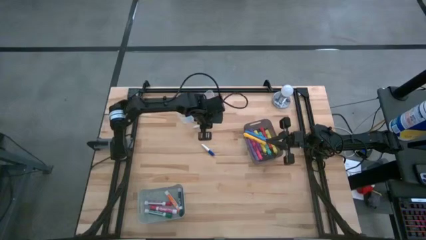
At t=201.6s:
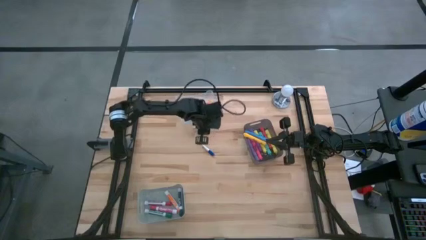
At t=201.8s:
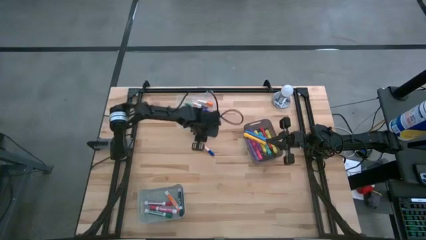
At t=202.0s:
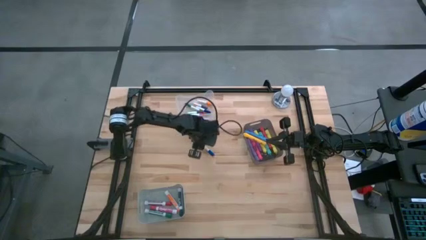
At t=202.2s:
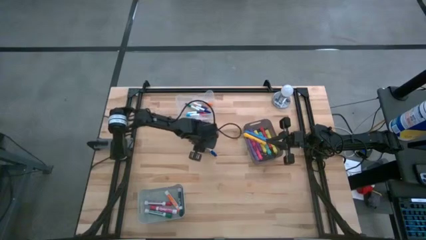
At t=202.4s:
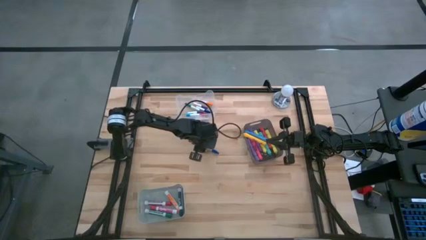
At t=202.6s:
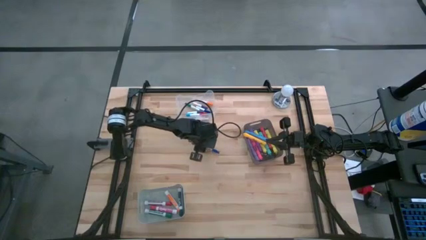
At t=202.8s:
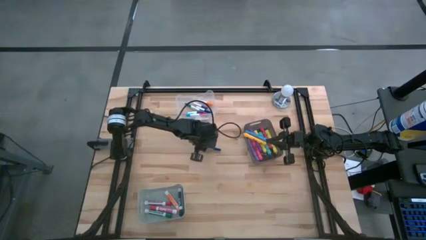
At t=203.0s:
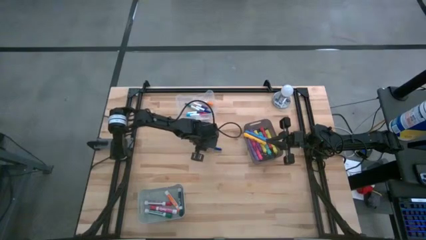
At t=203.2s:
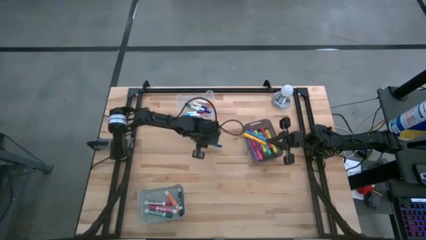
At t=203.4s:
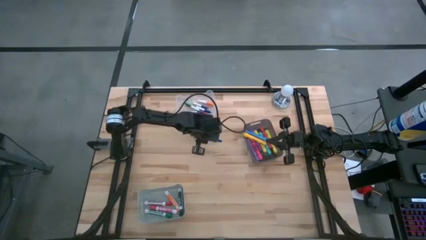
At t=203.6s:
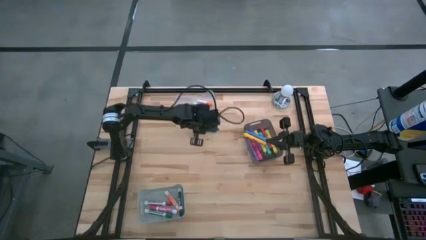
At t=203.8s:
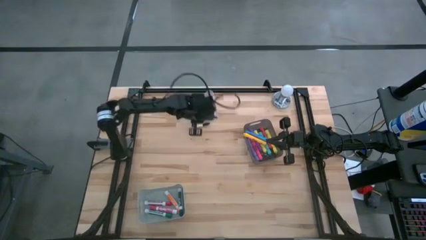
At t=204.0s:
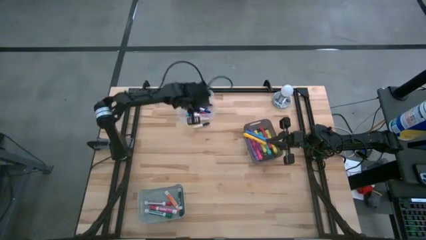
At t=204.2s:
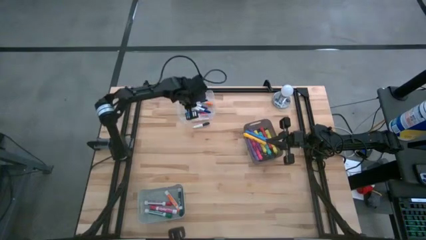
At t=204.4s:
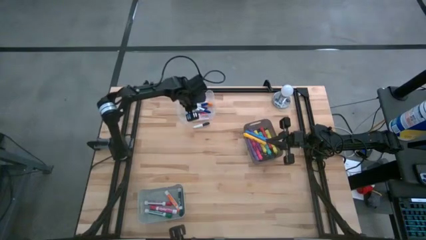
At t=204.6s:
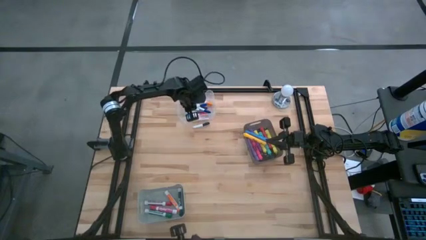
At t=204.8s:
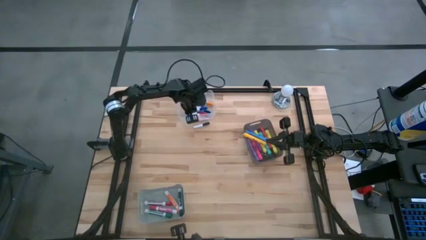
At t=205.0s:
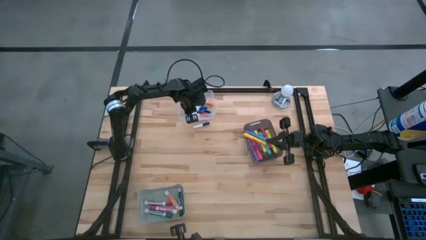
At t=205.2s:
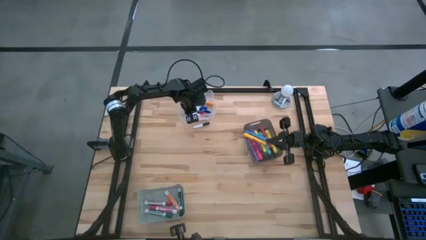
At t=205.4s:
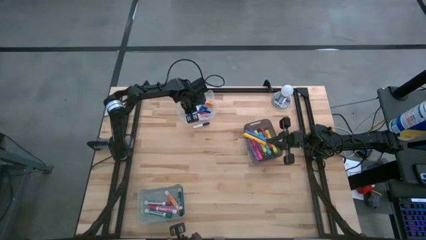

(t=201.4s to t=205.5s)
Task: Pick & Place Markers
Put the white and blue highlighter pen into the transparent bin

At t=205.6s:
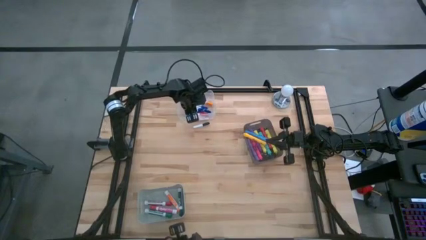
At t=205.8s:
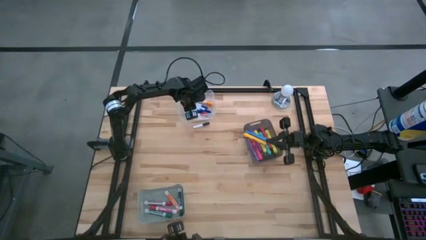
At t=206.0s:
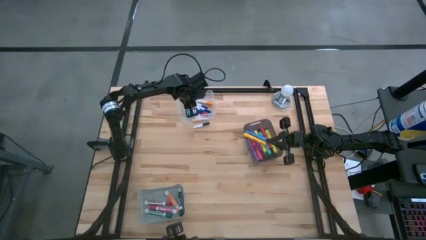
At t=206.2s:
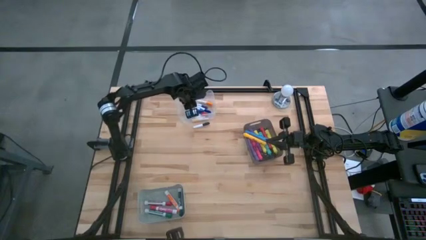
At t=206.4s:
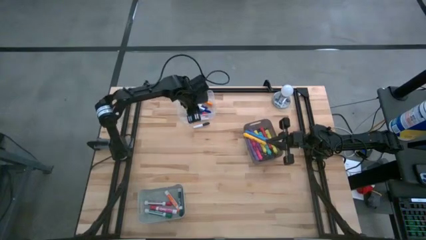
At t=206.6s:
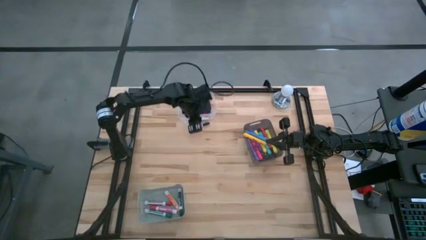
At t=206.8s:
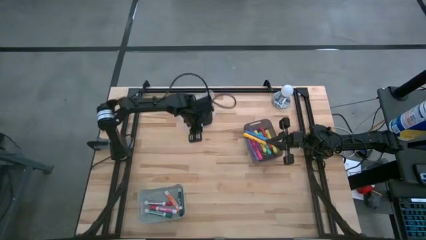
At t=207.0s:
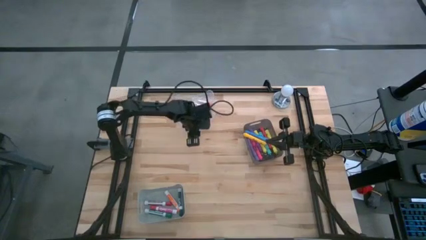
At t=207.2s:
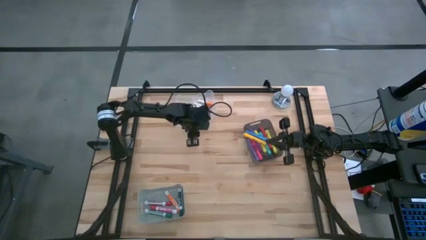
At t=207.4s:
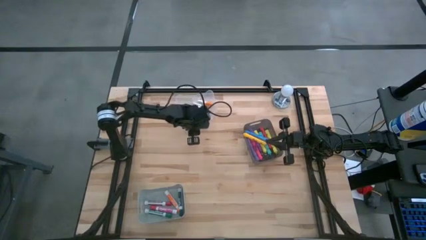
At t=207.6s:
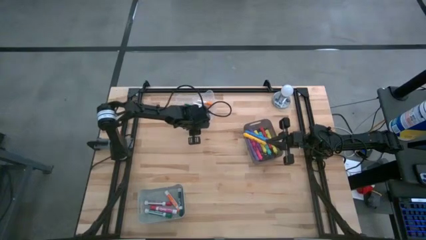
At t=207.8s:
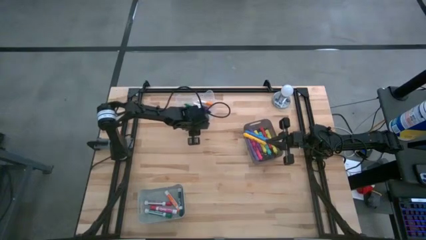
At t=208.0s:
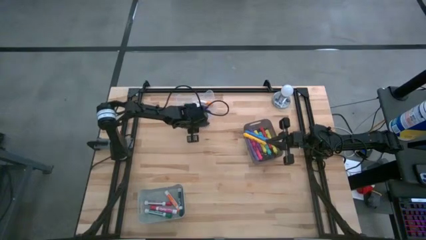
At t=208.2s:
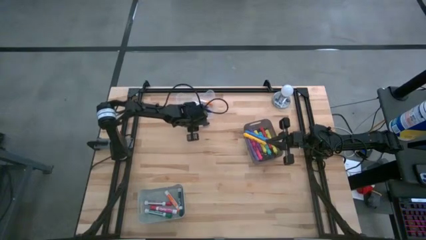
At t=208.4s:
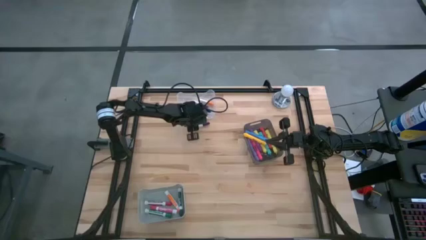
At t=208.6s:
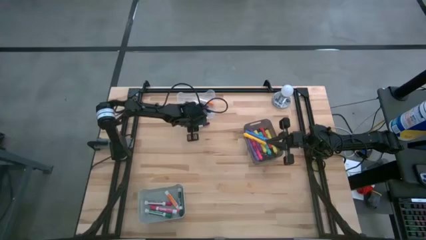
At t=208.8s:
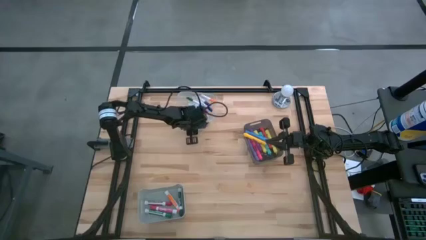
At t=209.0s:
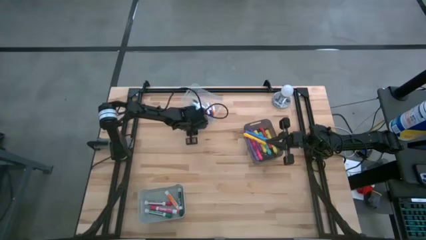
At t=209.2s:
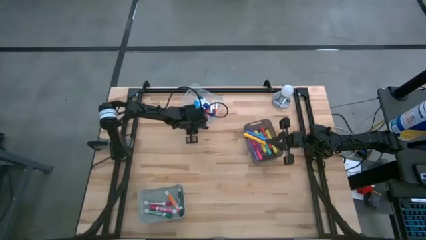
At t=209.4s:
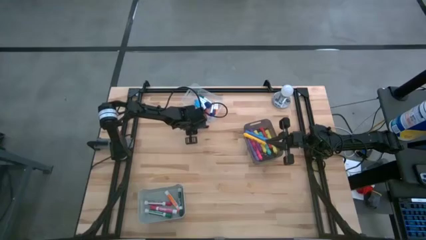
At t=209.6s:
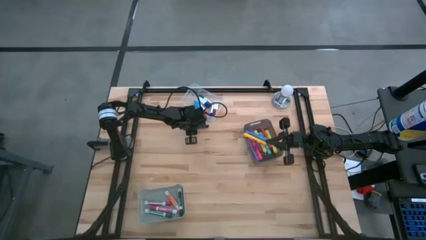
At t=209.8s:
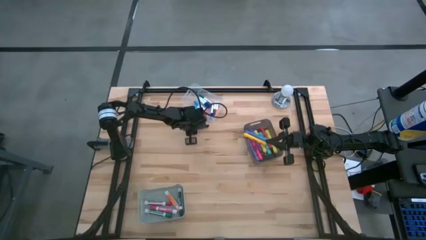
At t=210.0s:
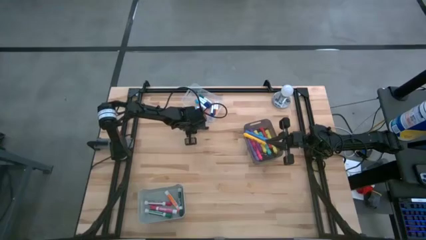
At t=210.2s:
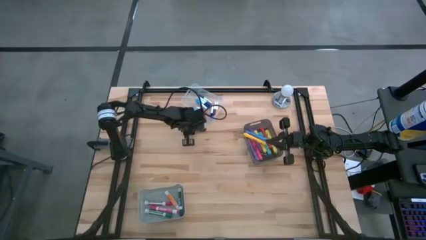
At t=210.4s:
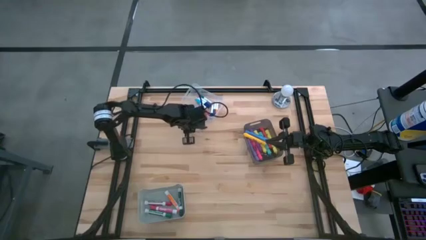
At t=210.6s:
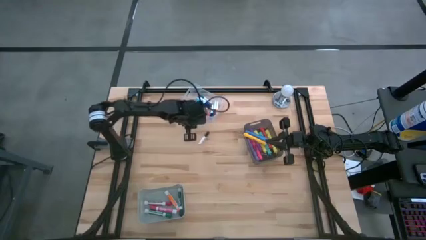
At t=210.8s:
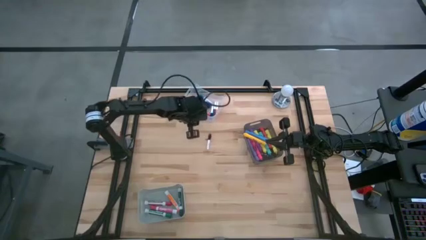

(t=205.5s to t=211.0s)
Put the white and black highlighter pen into the transparent bin

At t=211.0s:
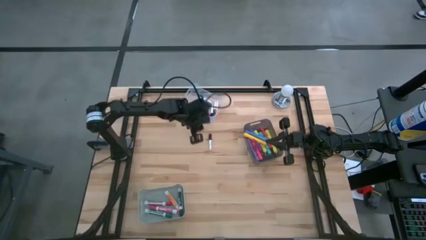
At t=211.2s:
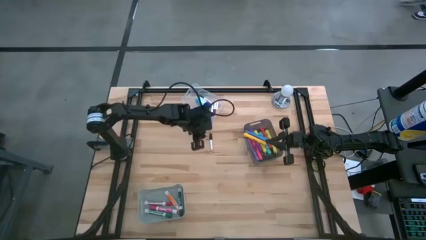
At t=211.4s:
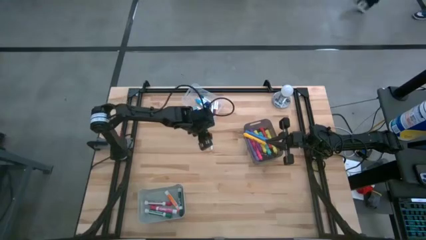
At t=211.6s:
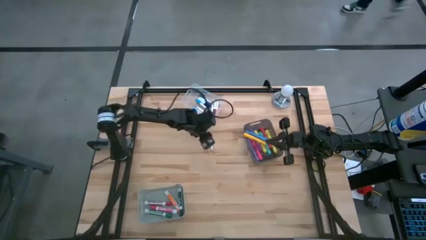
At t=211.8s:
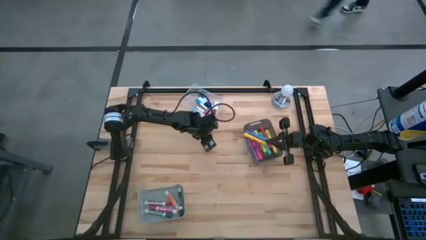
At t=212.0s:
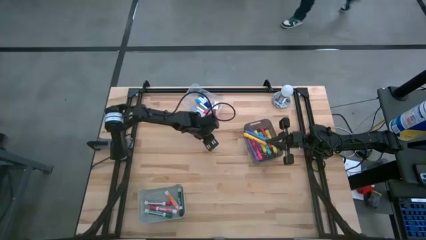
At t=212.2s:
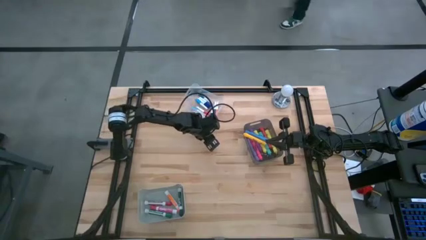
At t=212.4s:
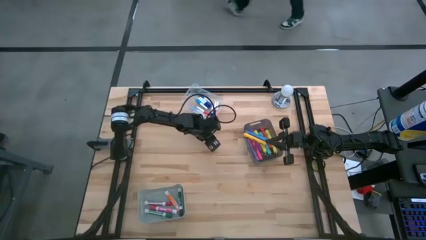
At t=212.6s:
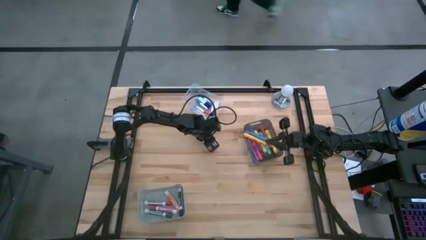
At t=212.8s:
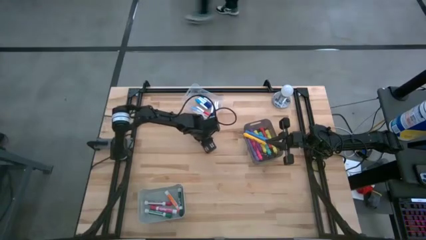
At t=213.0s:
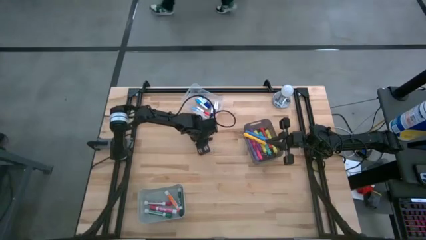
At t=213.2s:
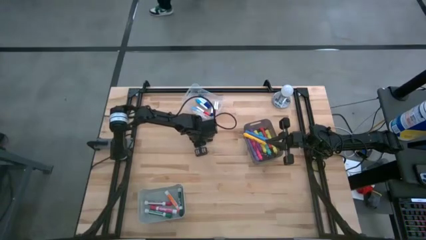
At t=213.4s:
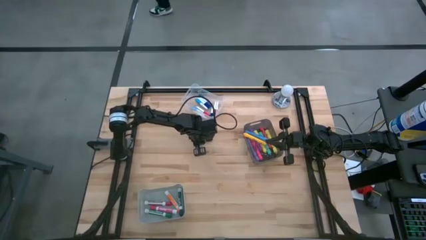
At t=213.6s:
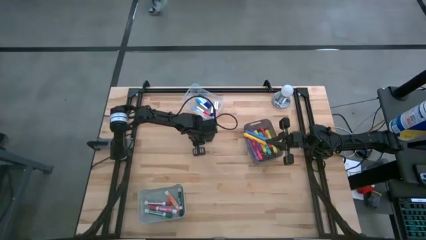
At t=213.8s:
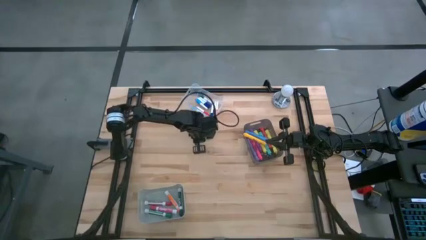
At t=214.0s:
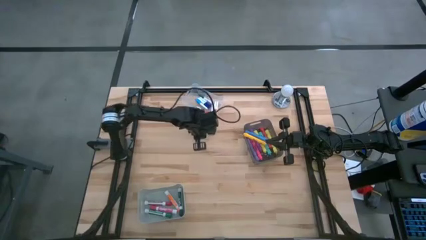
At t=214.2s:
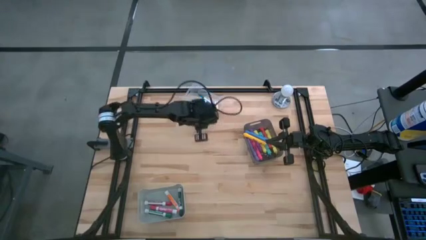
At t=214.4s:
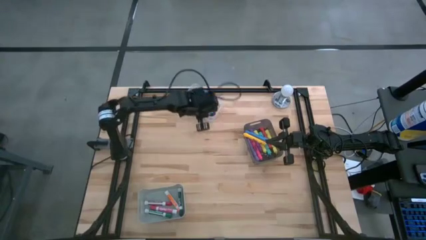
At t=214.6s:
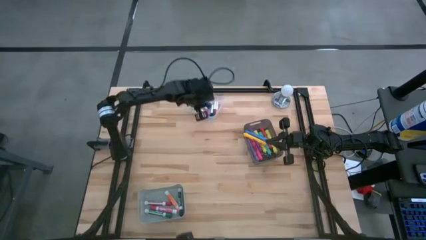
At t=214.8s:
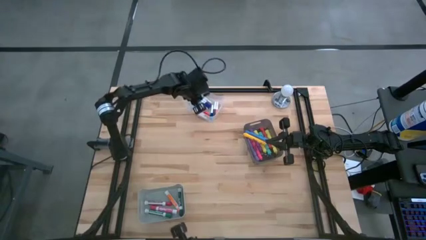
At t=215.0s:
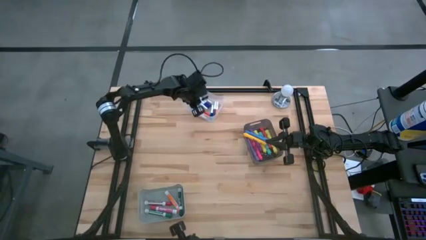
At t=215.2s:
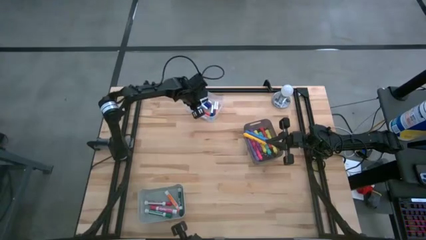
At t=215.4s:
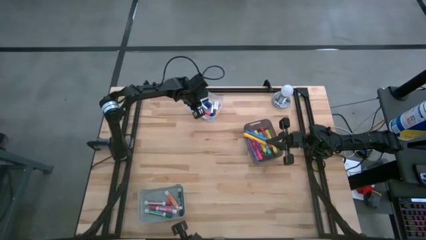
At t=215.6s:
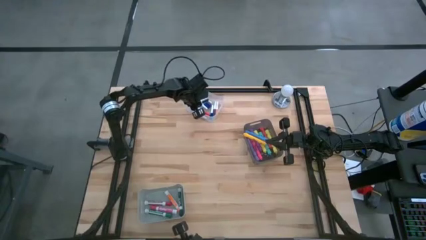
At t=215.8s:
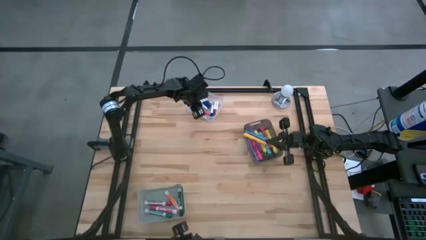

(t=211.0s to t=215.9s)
Put the white and black highlighter pen into the transparent bin

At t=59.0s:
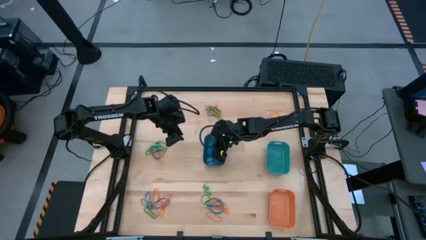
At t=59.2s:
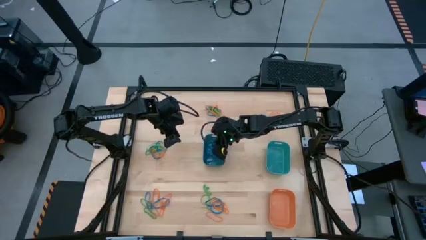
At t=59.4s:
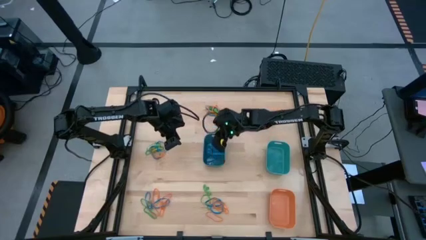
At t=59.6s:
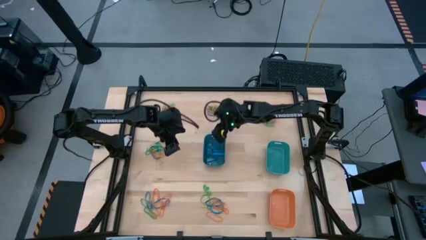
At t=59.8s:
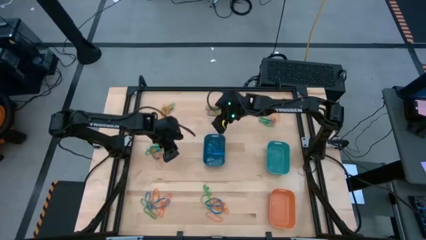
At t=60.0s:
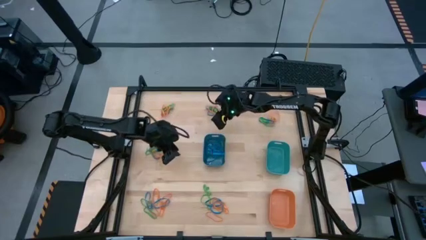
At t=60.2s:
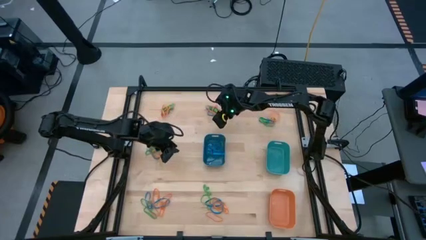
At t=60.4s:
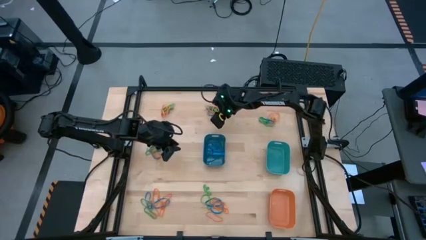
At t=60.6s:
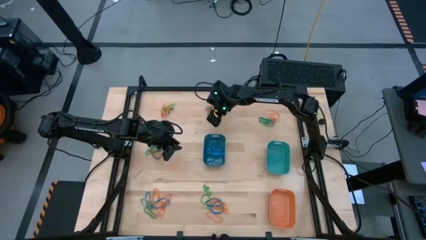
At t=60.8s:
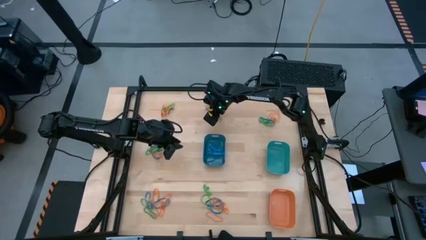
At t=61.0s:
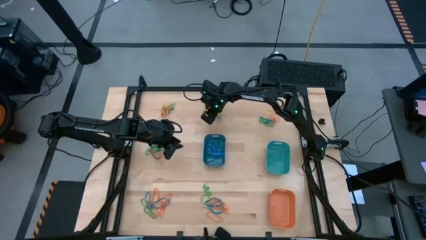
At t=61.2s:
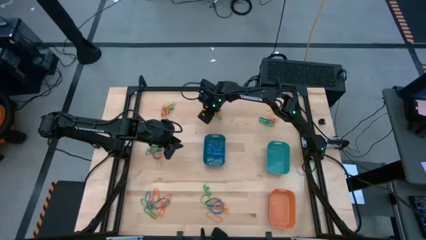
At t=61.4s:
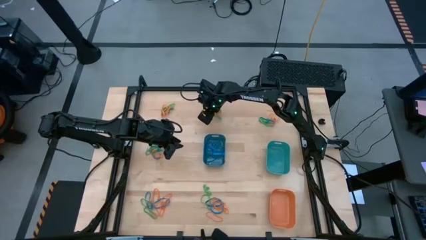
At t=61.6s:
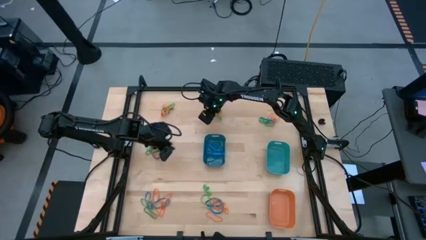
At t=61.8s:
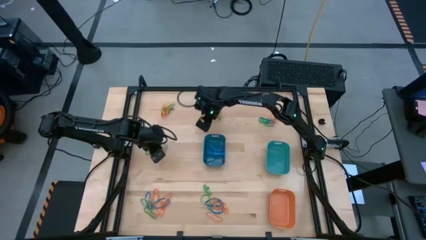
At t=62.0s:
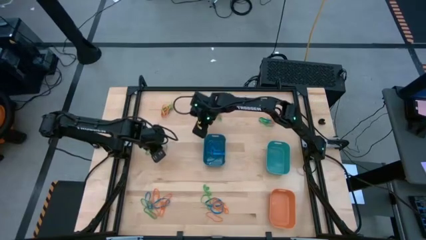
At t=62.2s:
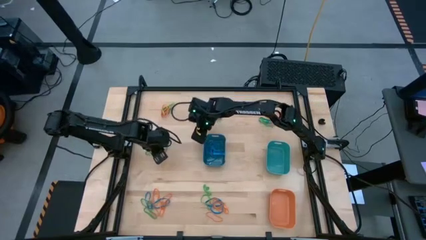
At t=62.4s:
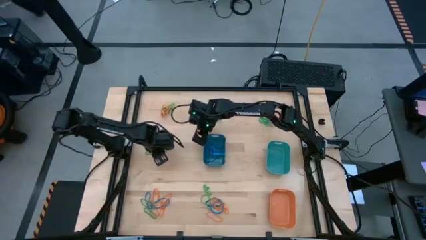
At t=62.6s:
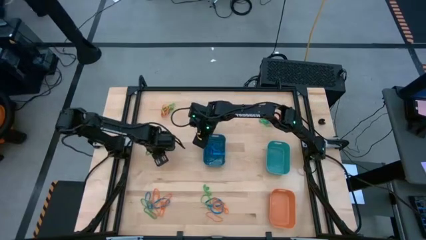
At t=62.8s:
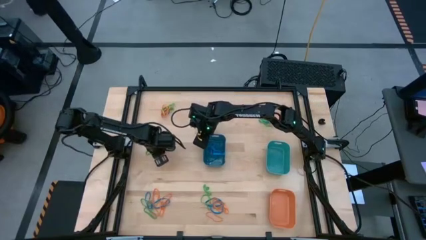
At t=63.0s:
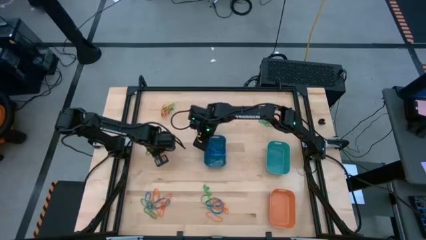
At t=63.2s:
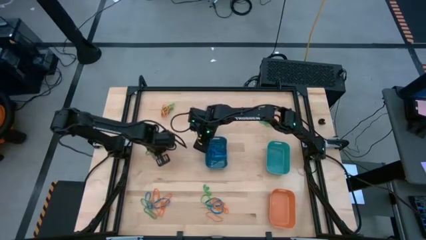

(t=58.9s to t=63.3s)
Task: Sort rubber bands into baskets
Put the blue rubberband into the blue bin
